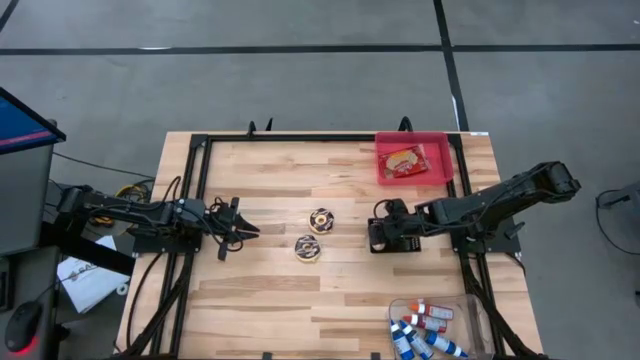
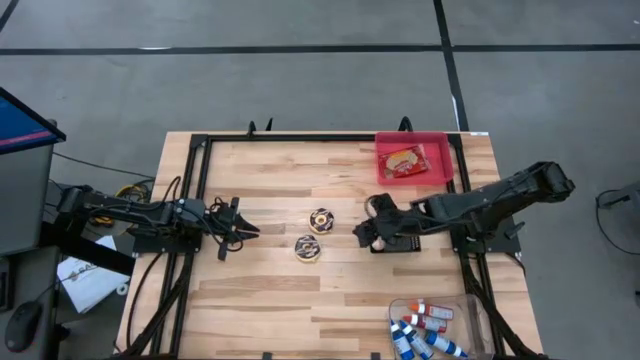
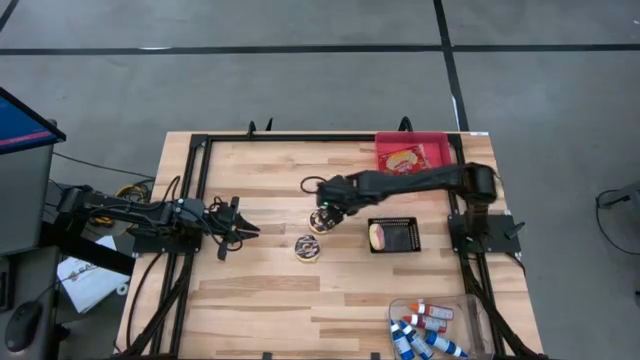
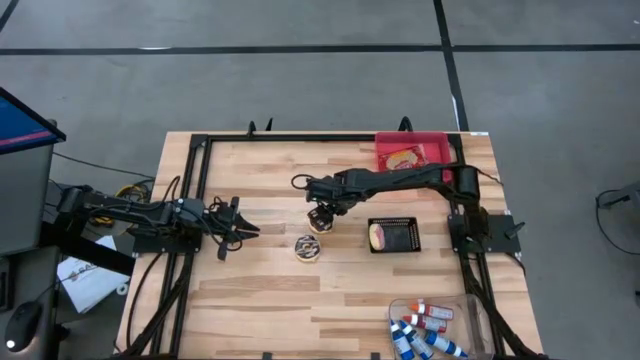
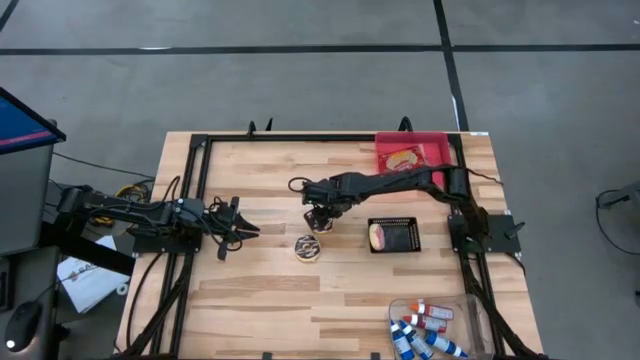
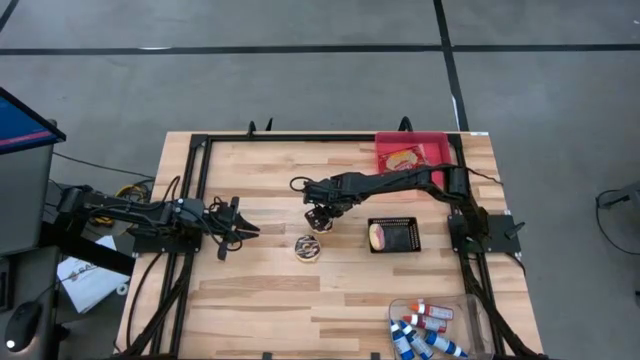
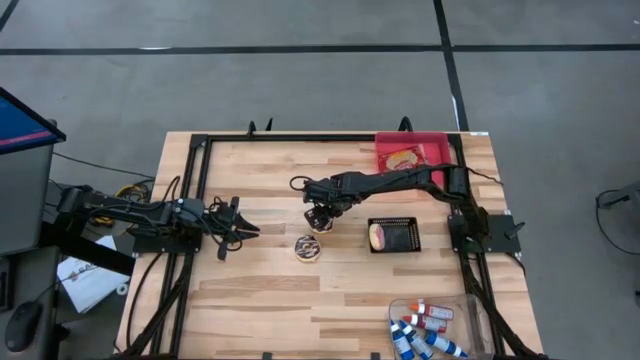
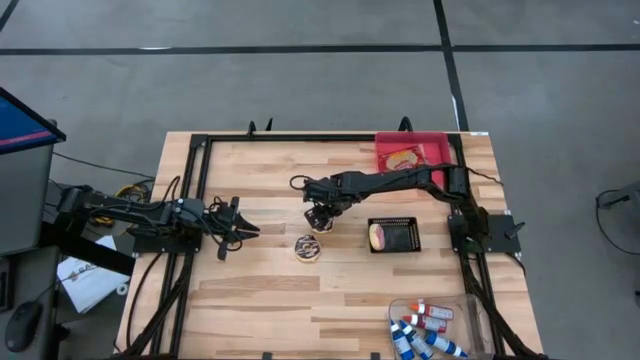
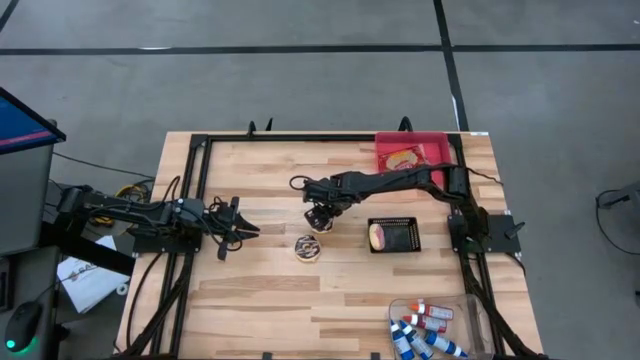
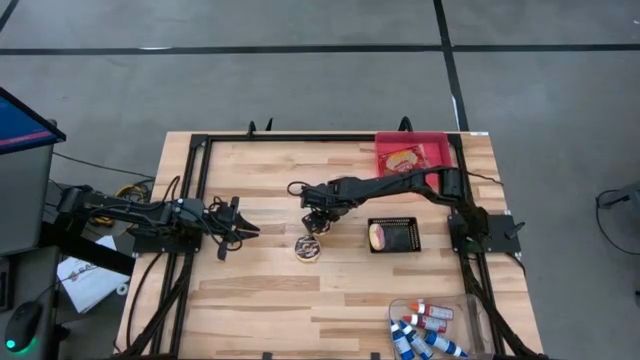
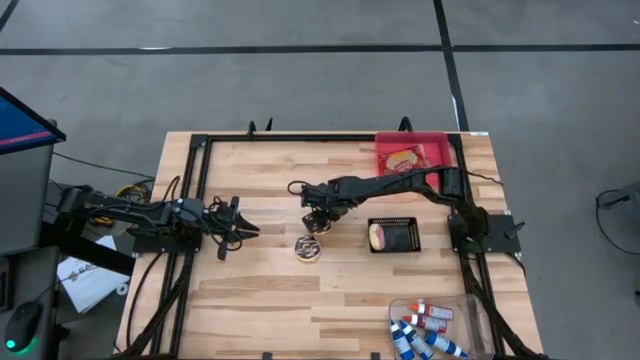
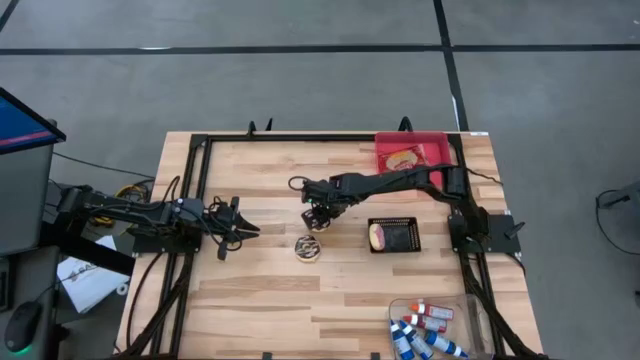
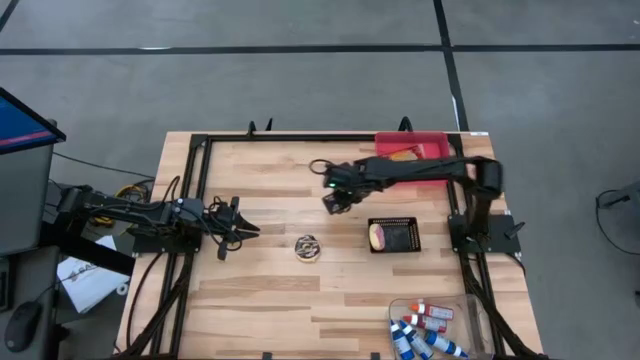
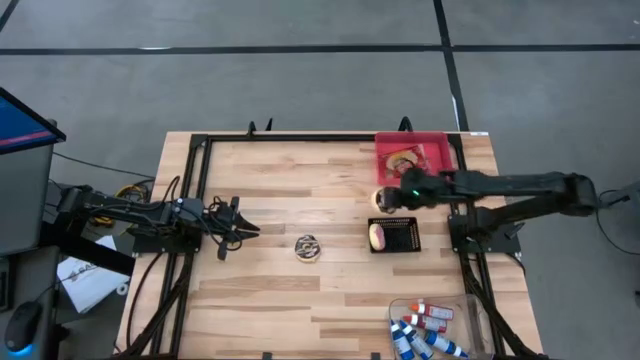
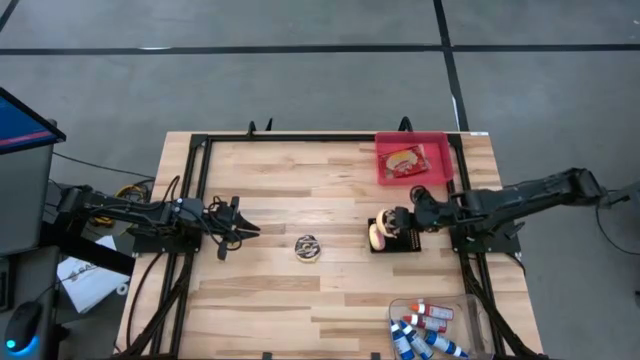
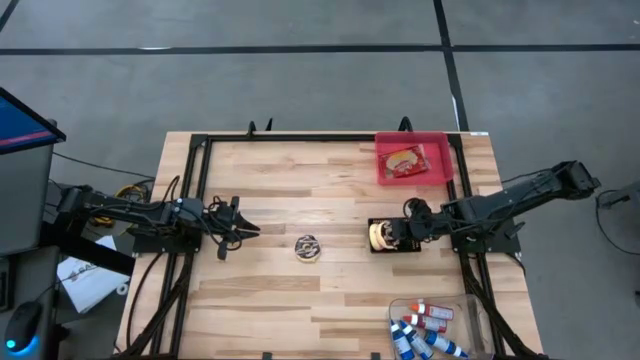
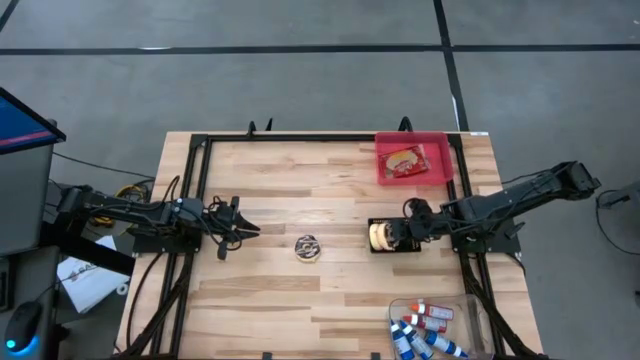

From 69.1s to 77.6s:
Put the top brown donut into the black bin

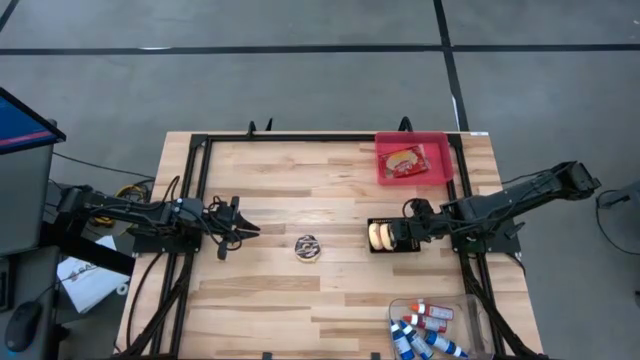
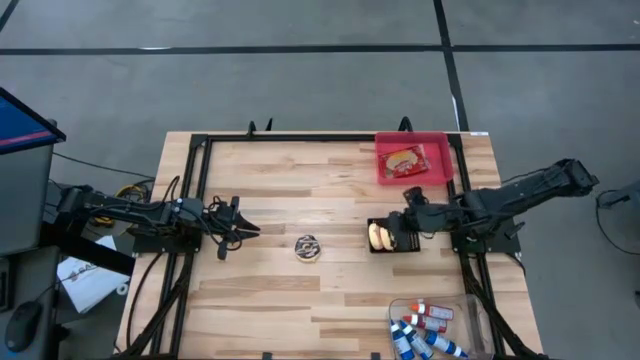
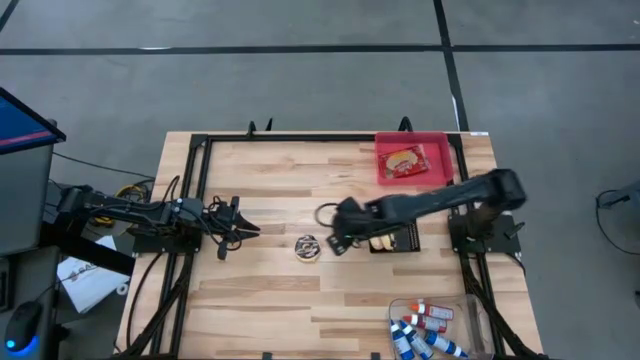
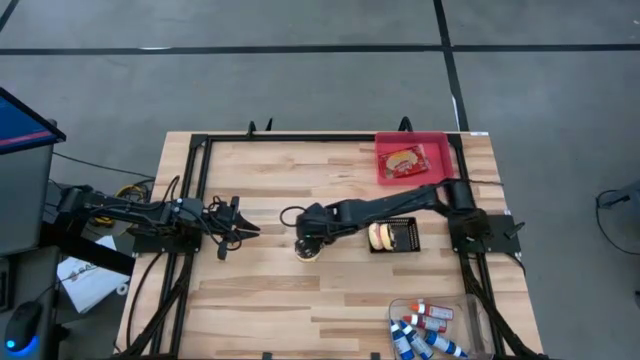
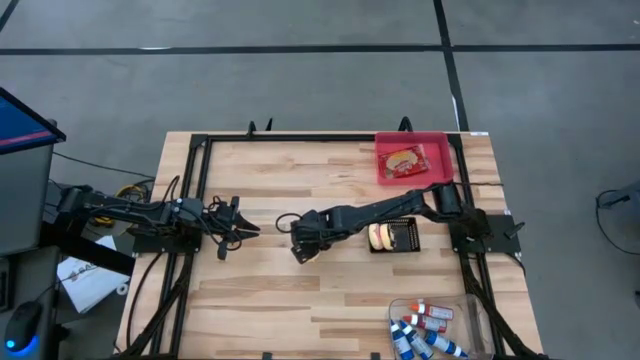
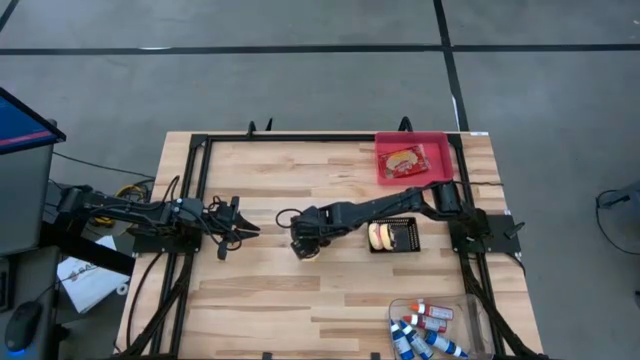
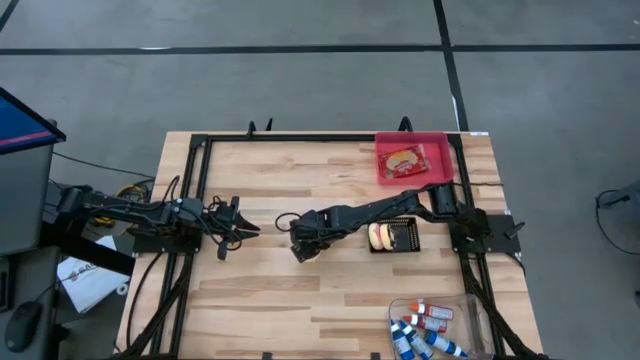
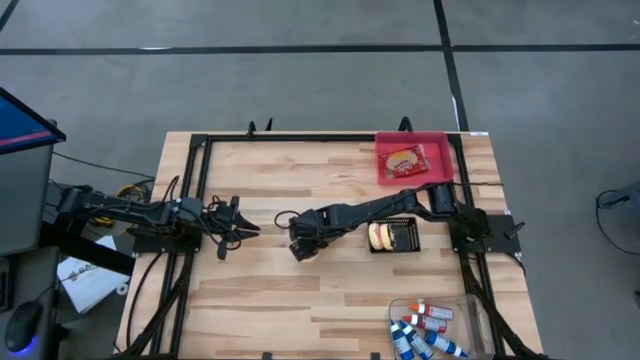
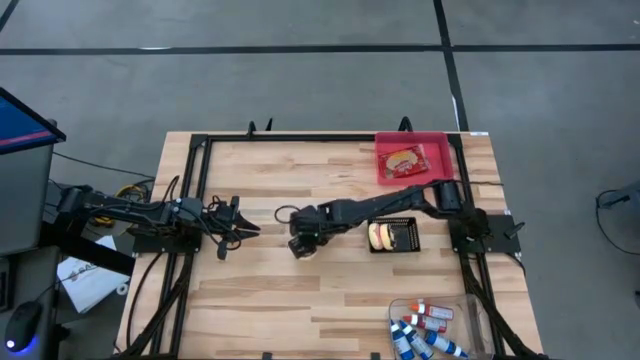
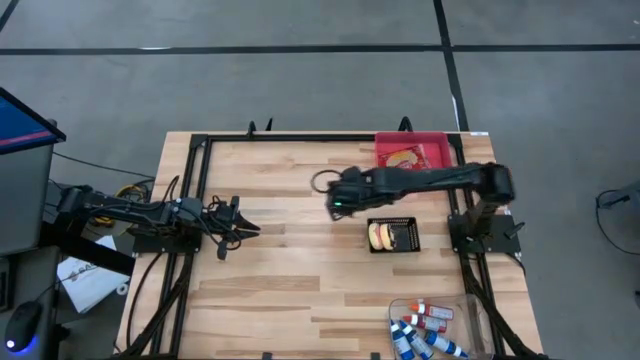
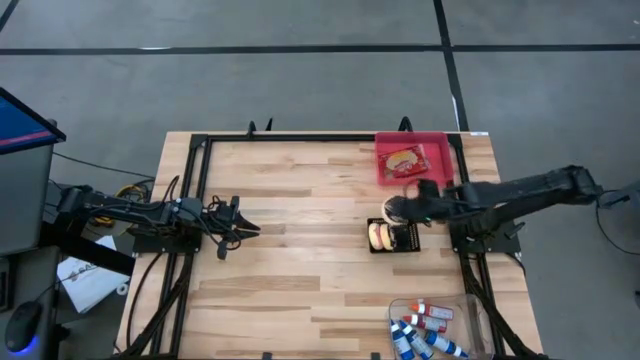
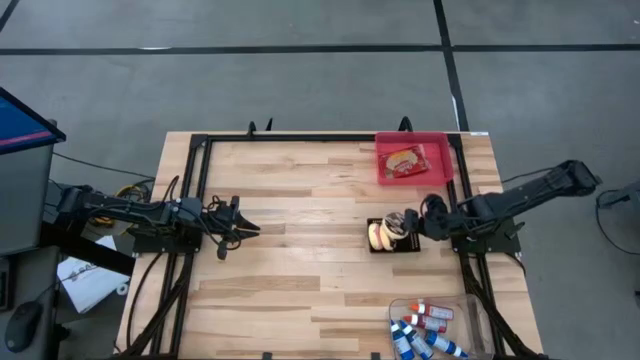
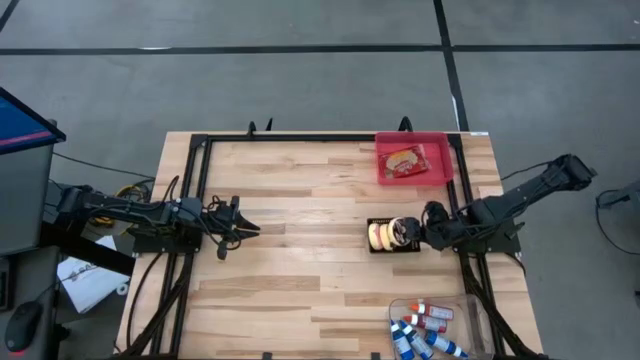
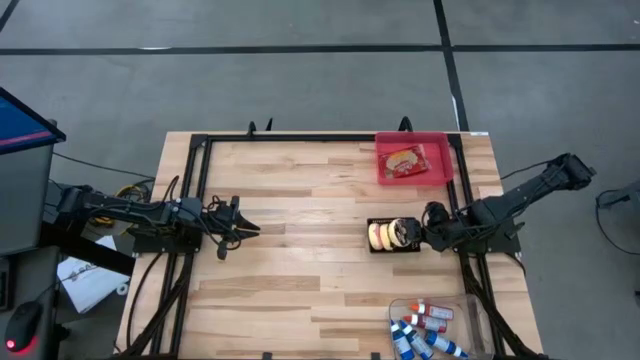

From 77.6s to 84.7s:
Put the brown donut into the black bin

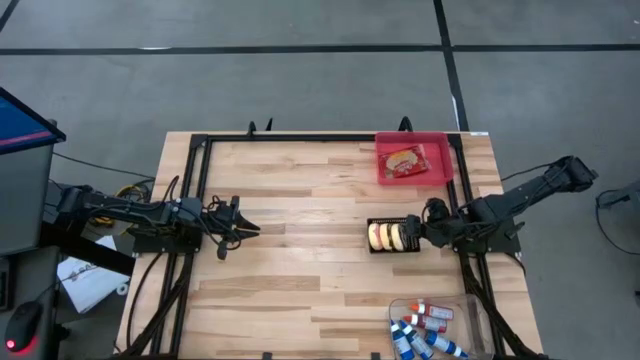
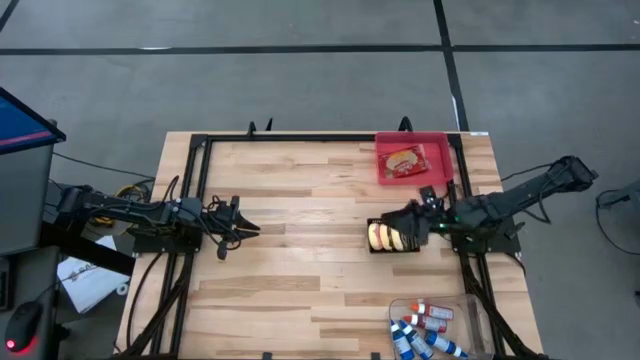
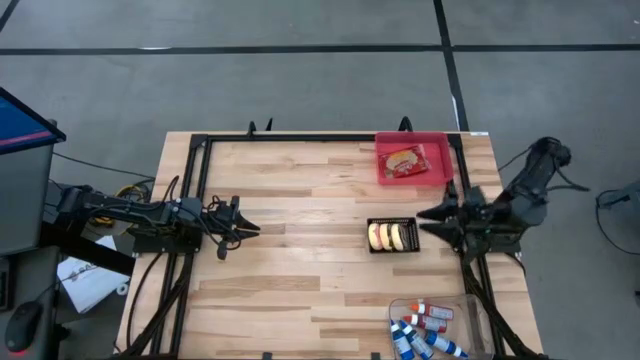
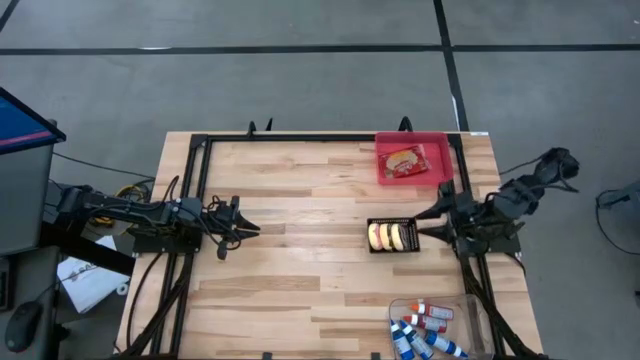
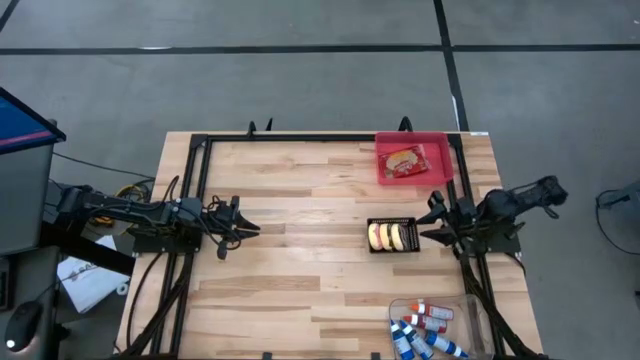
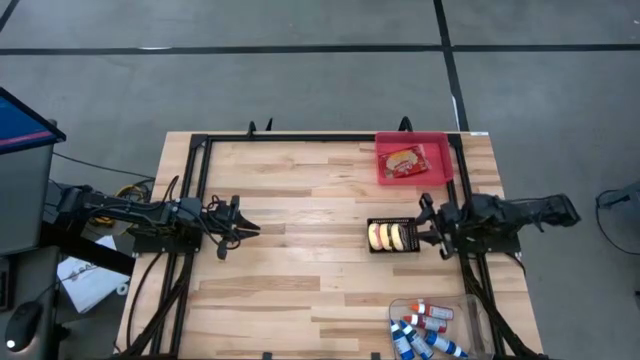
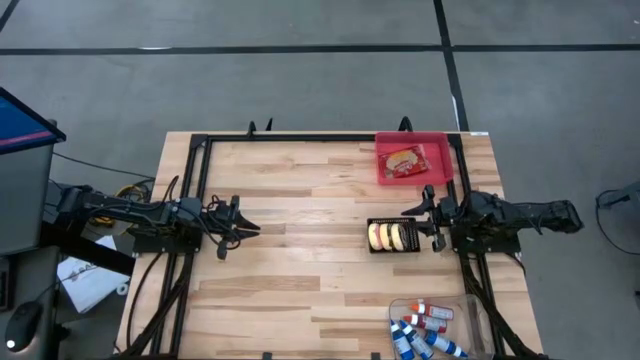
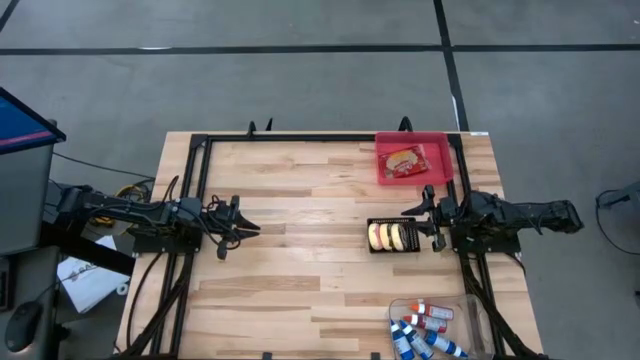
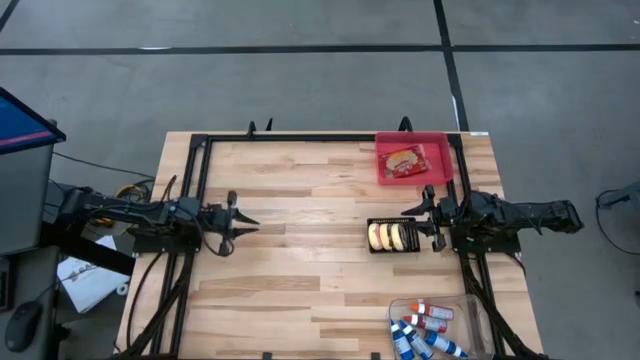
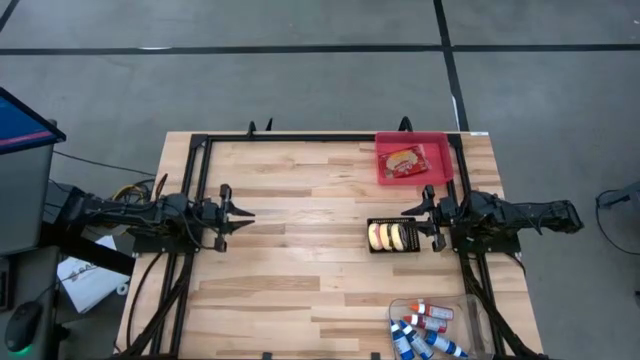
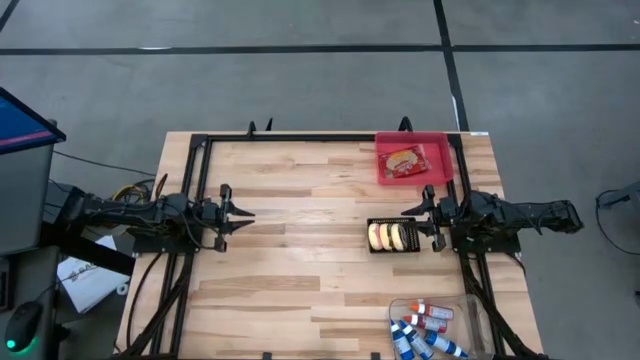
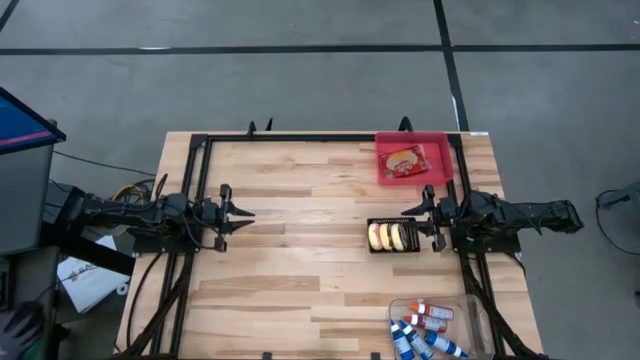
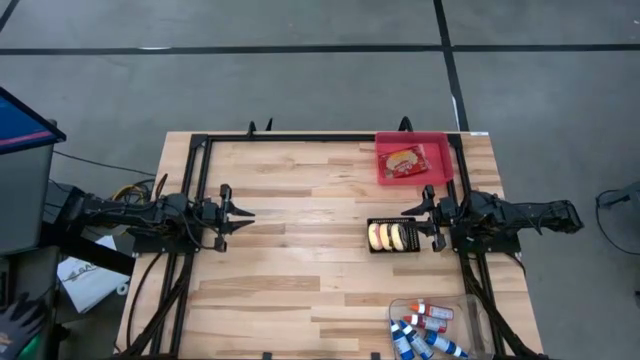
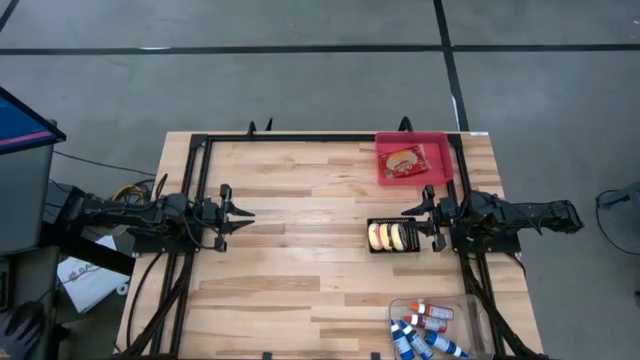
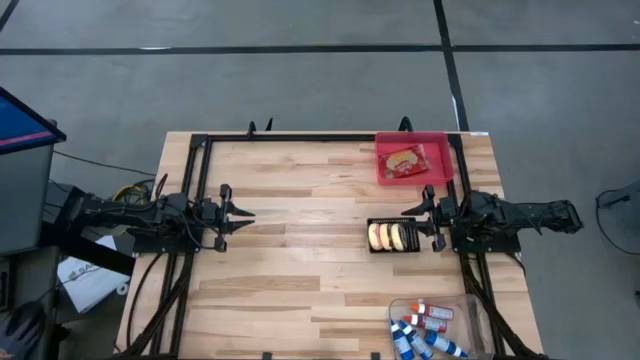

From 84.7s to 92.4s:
Return to Home Position
